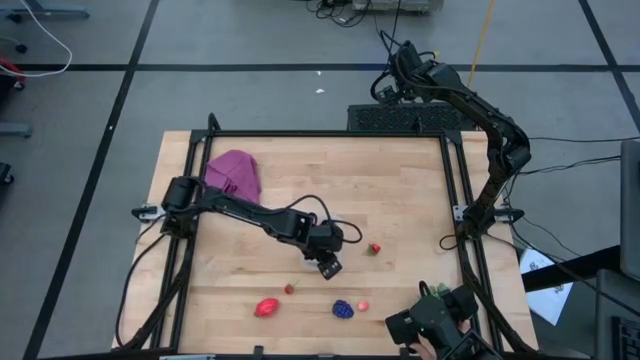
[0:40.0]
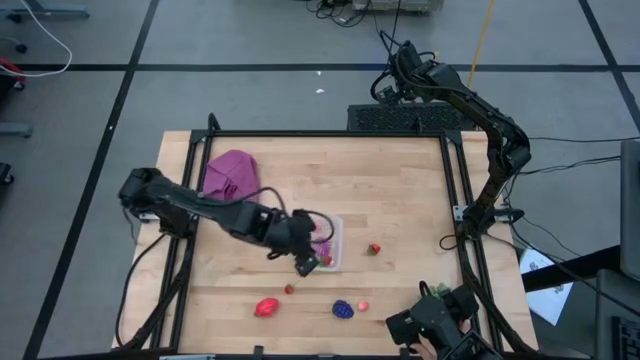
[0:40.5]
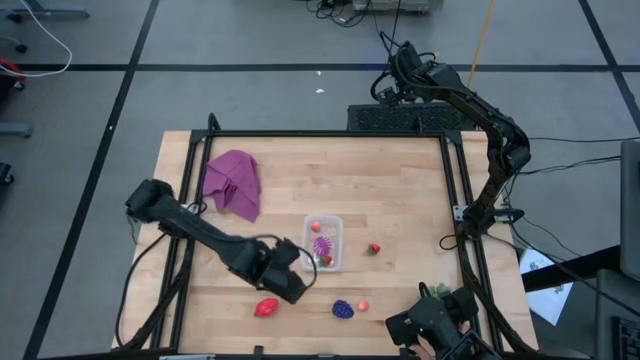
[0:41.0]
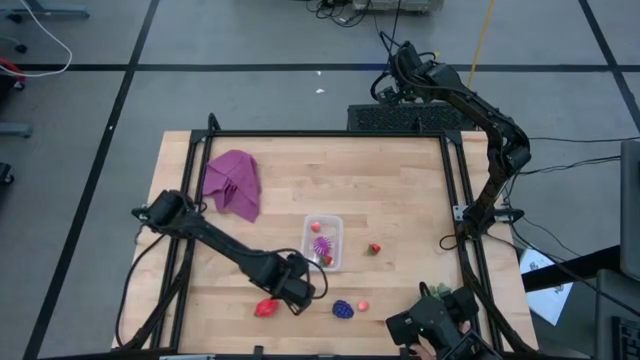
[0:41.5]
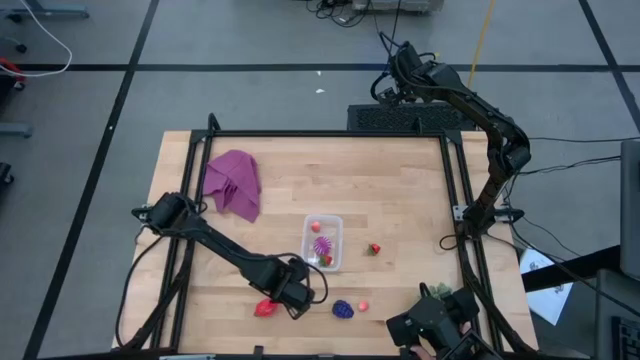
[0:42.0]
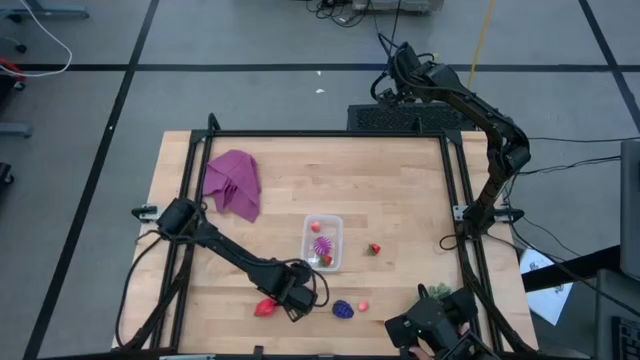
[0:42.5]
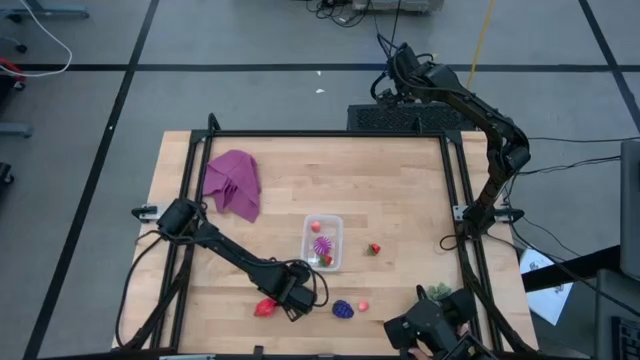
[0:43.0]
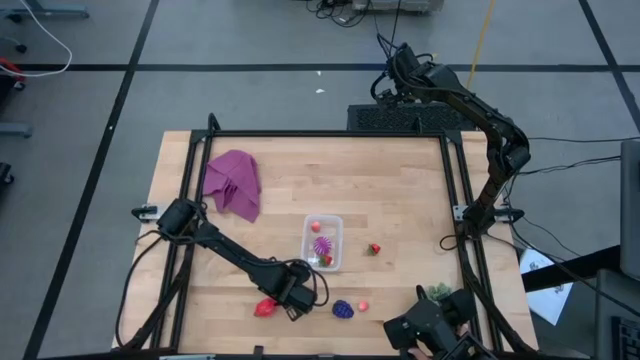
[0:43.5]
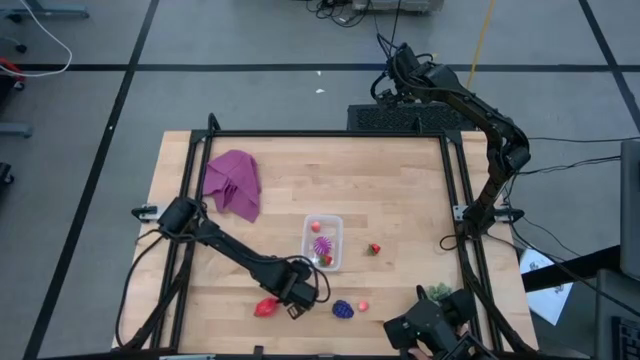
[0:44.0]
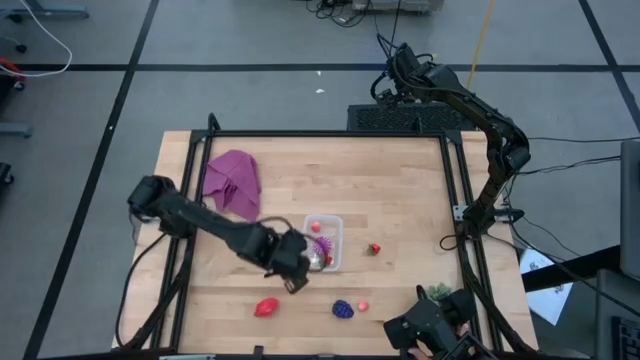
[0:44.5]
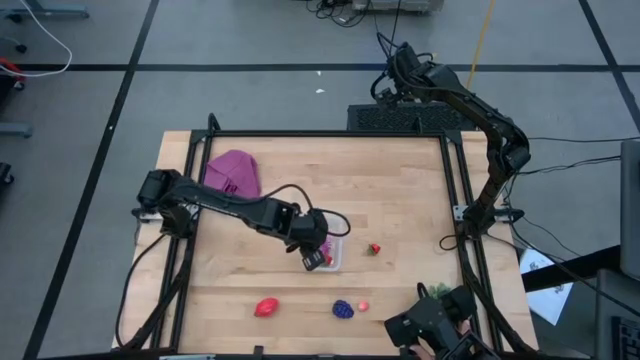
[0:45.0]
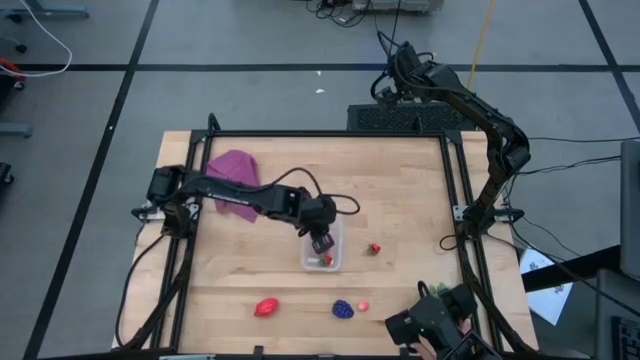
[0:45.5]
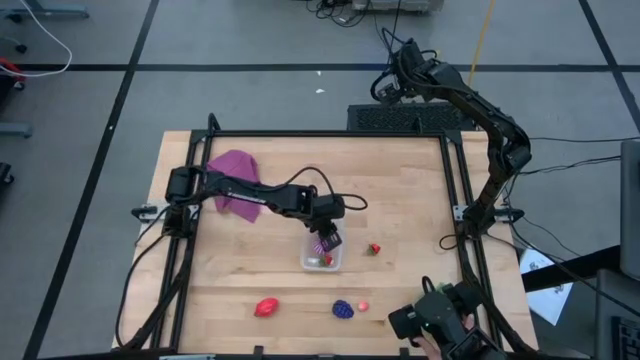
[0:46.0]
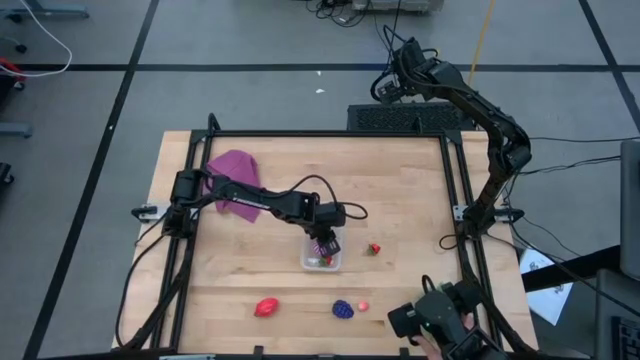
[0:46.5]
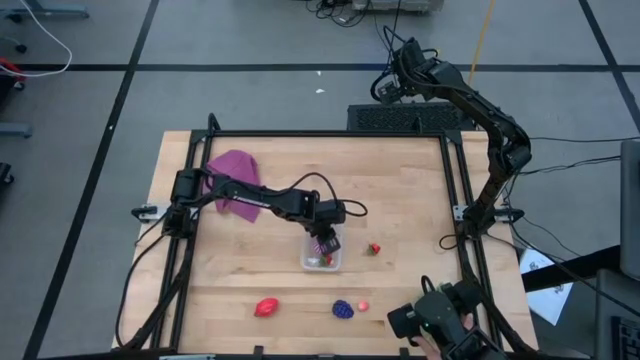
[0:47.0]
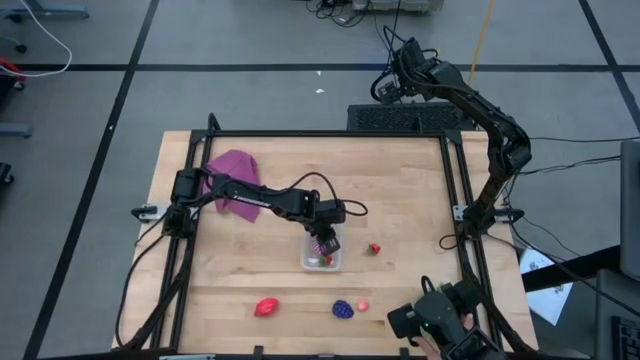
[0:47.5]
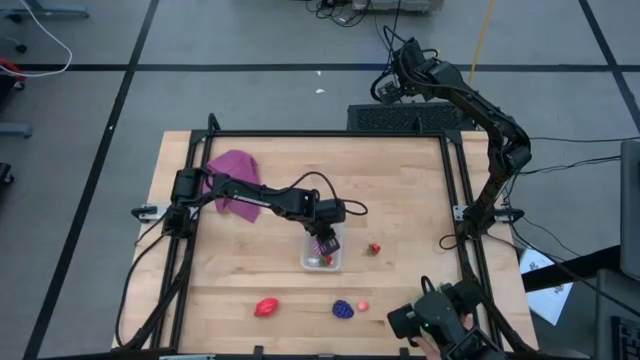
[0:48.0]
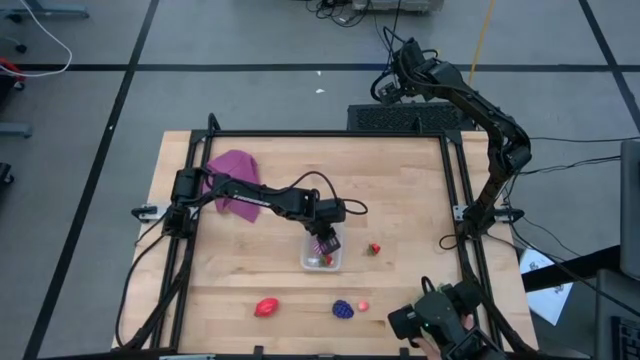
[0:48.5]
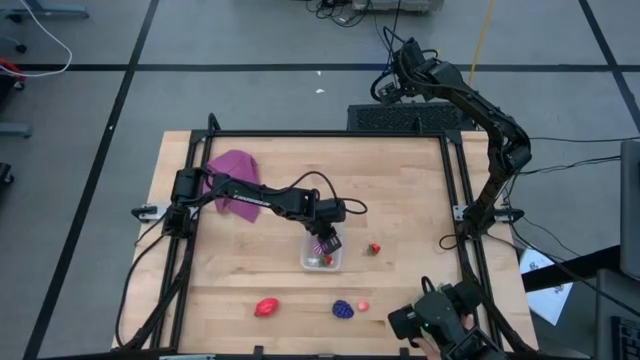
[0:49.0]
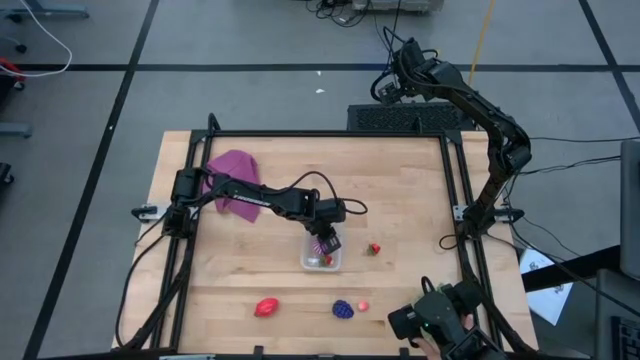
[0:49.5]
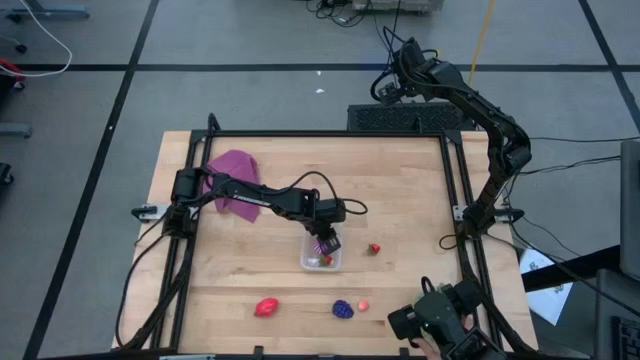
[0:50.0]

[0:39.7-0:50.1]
Task: Pick and placing Produce into tupperware
Put the bottom strawberry into the transparent bin

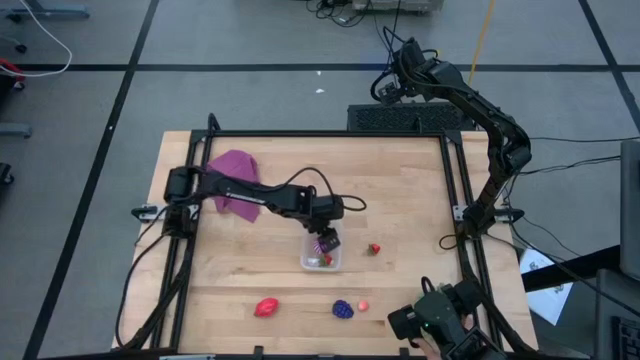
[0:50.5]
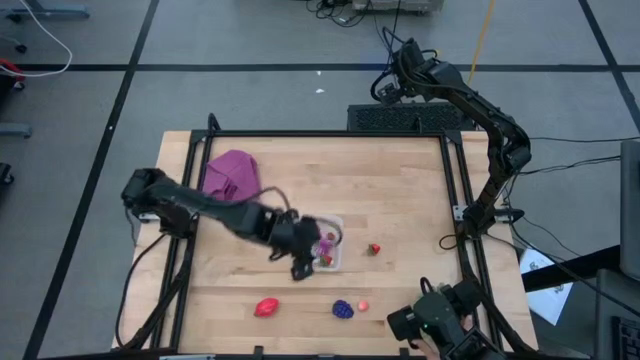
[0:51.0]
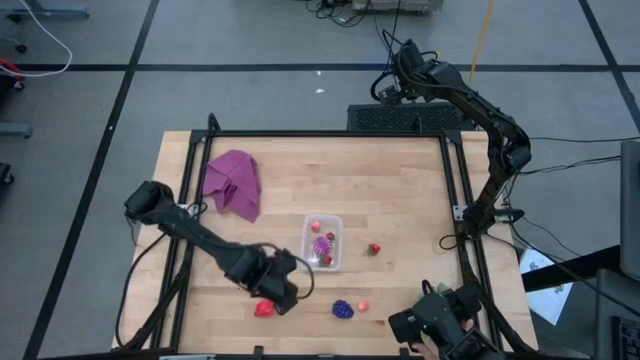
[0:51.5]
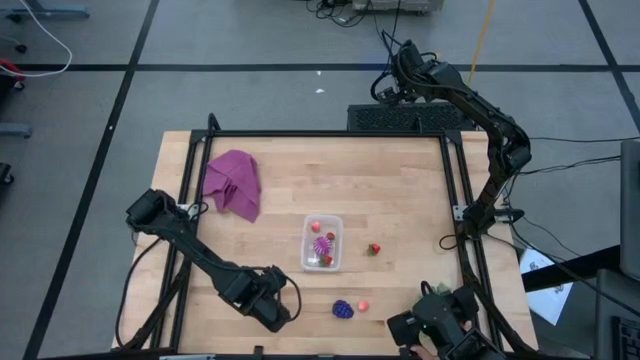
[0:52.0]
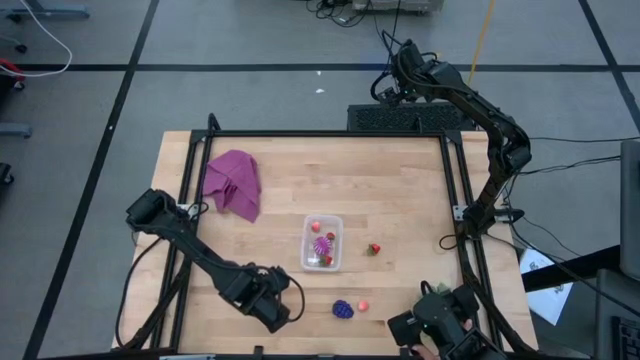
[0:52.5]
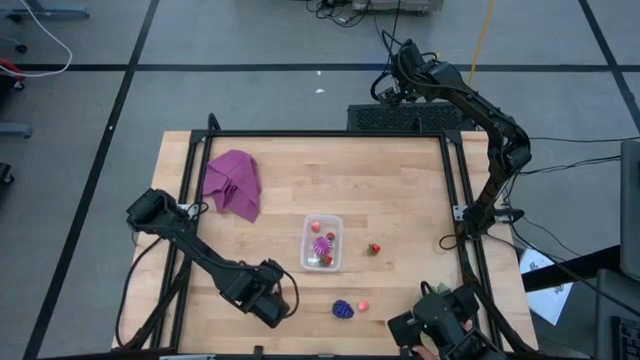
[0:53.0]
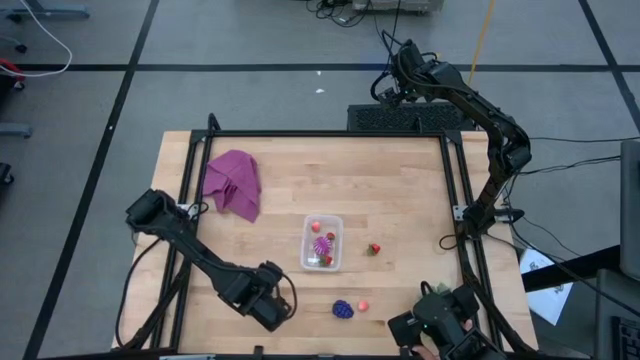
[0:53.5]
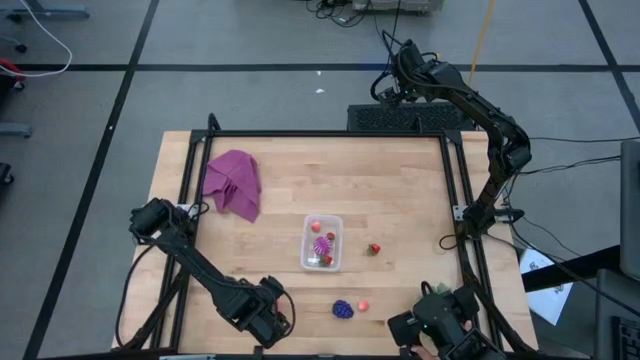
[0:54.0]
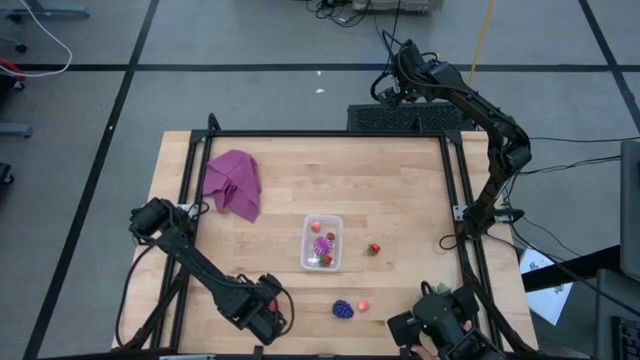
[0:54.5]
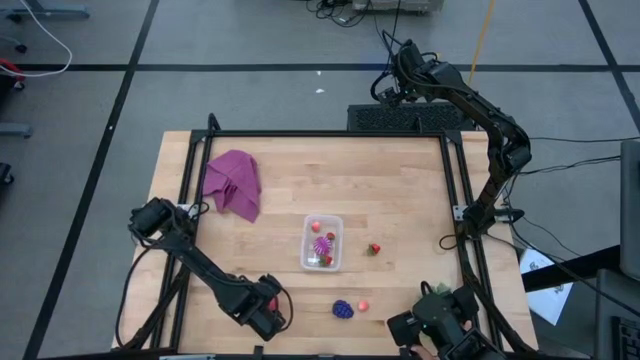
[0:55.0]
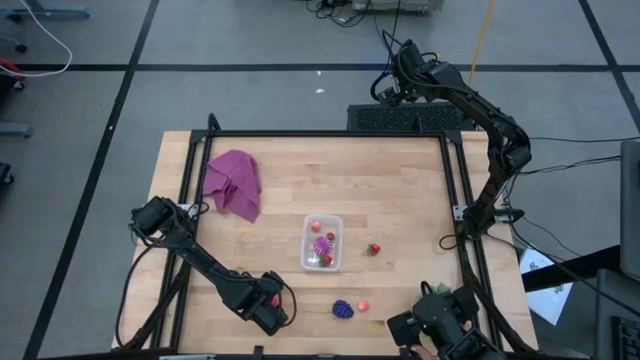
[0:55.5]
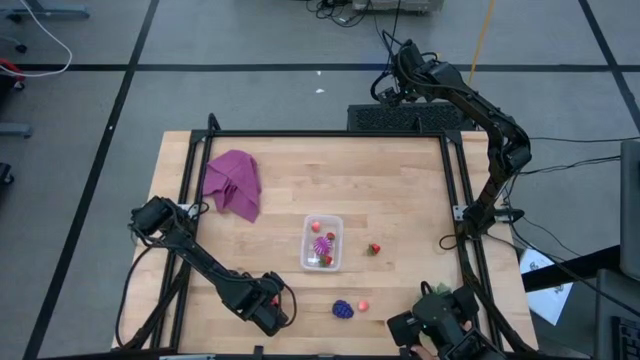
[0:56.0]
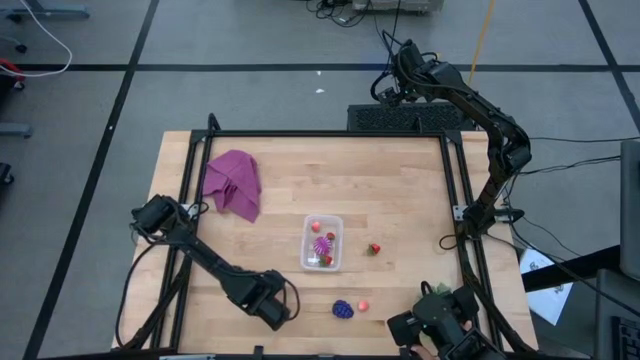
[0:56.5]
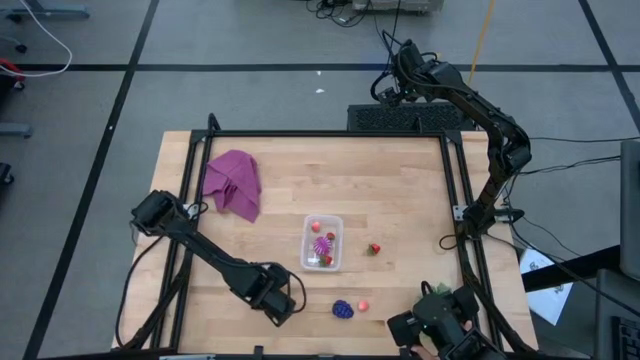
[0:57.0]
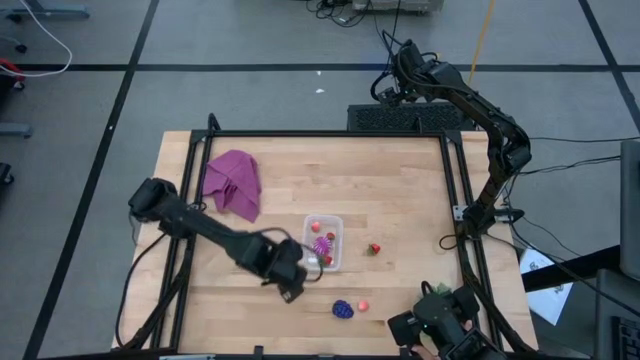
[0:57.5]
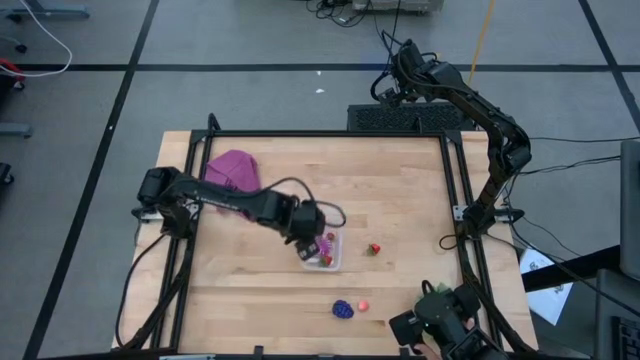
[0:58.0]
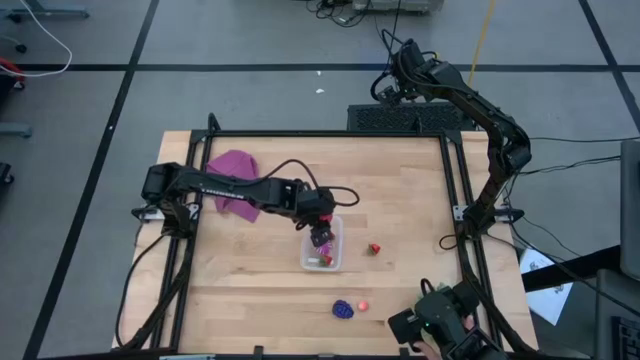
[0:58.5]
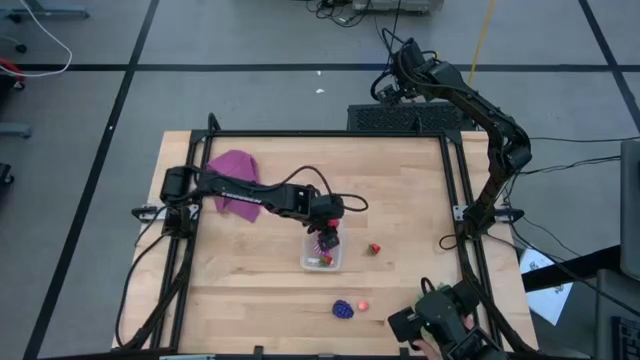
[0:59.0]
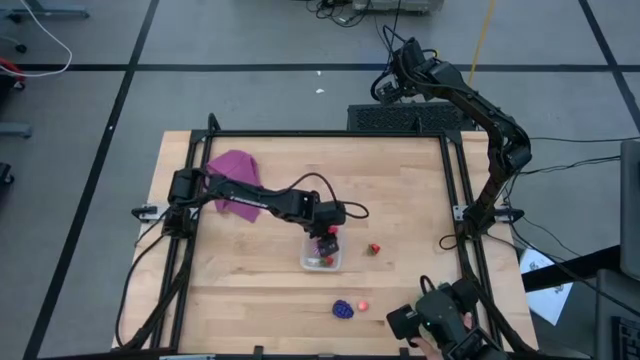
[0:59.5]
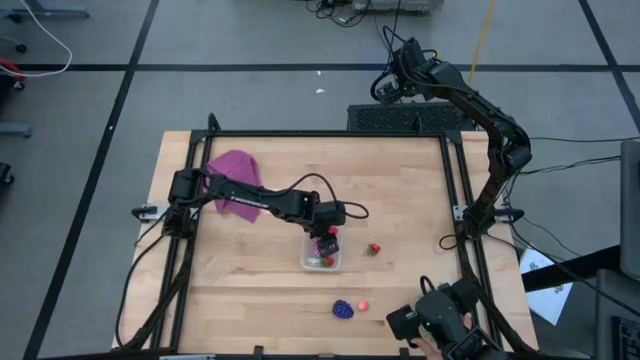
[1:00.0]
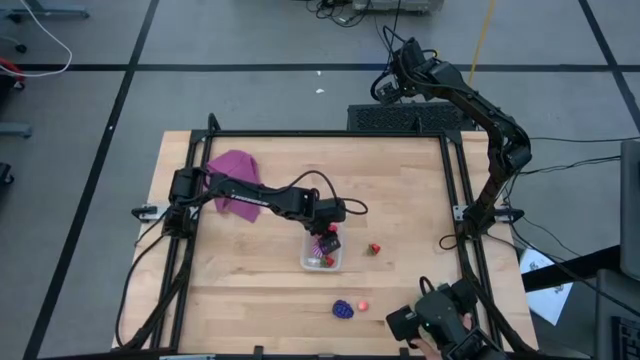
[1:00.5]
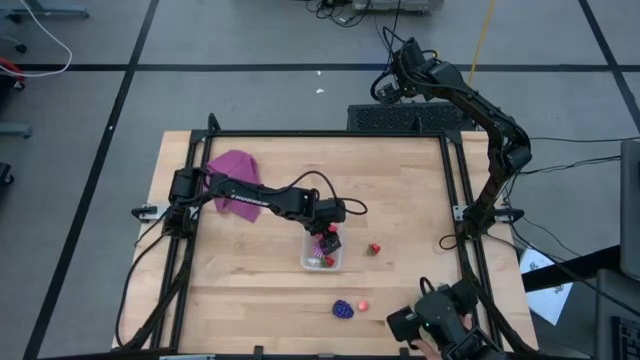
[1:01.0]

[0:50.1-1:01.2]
Put the dragon fruit into the transparent bin
